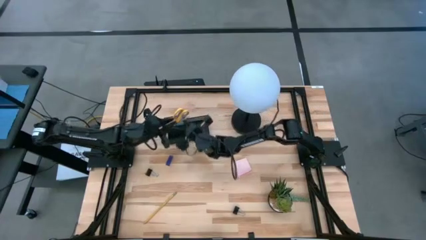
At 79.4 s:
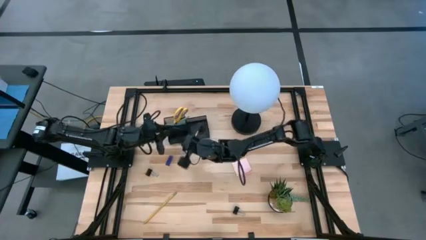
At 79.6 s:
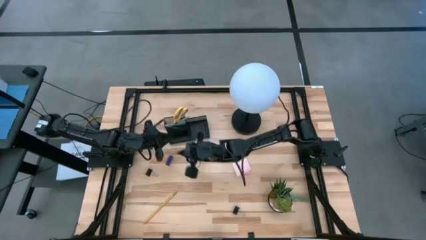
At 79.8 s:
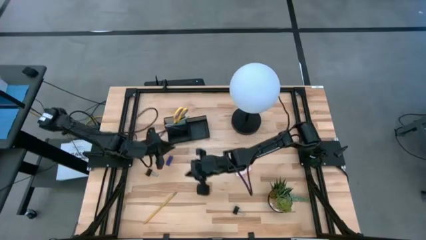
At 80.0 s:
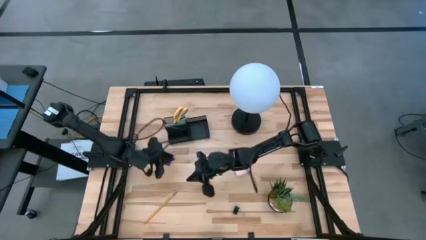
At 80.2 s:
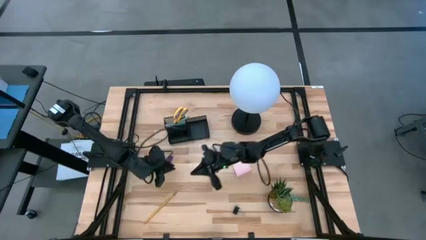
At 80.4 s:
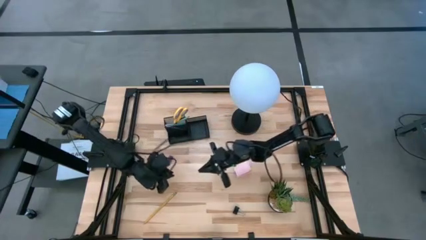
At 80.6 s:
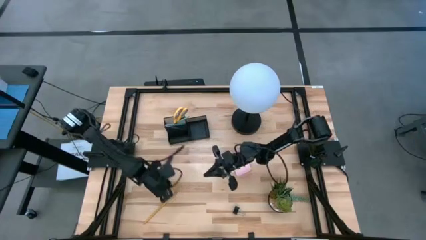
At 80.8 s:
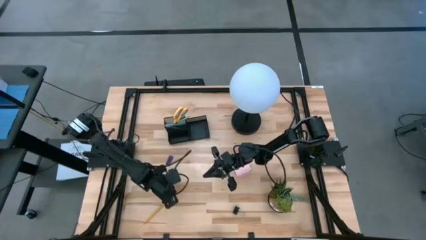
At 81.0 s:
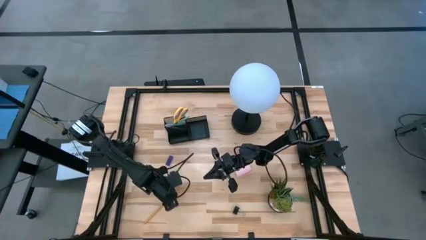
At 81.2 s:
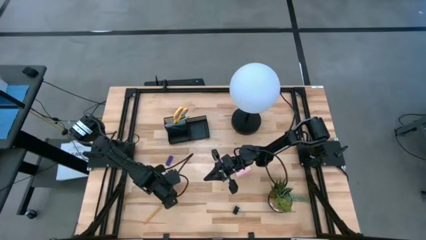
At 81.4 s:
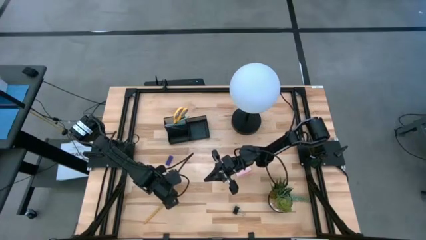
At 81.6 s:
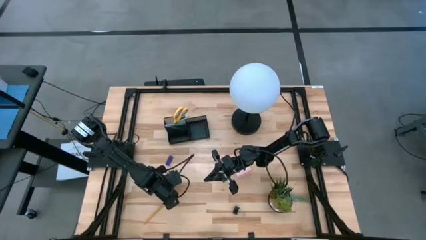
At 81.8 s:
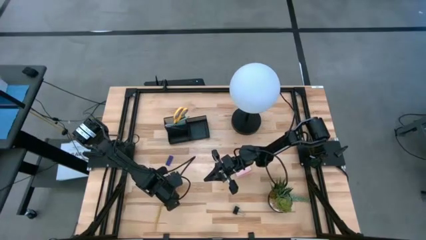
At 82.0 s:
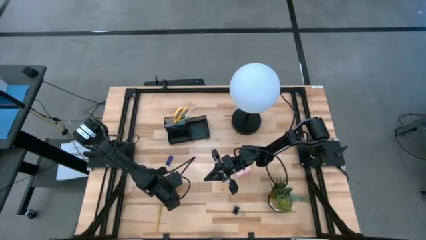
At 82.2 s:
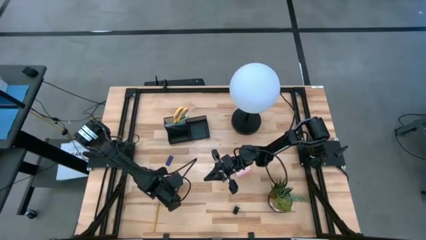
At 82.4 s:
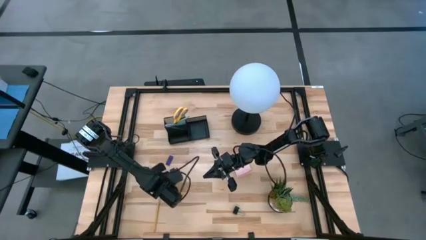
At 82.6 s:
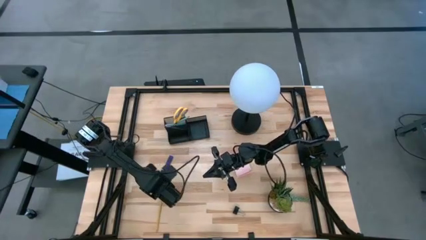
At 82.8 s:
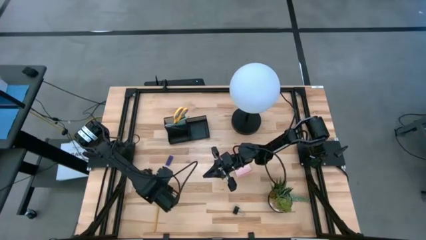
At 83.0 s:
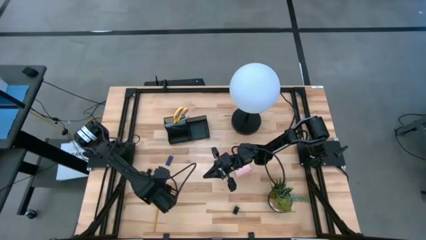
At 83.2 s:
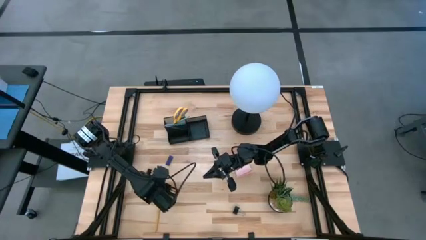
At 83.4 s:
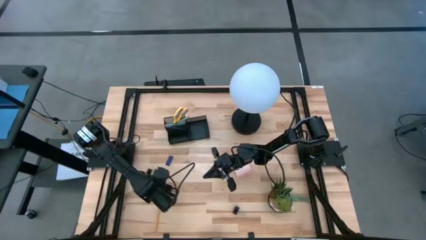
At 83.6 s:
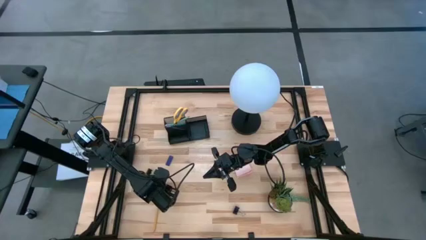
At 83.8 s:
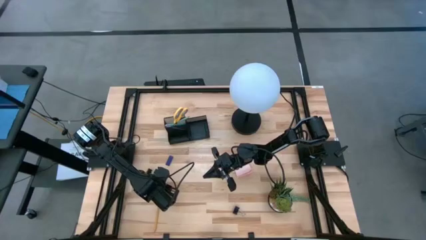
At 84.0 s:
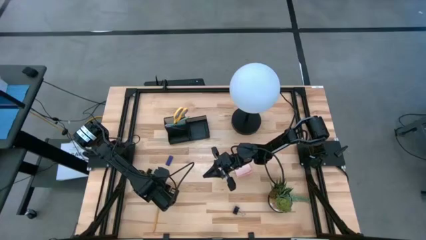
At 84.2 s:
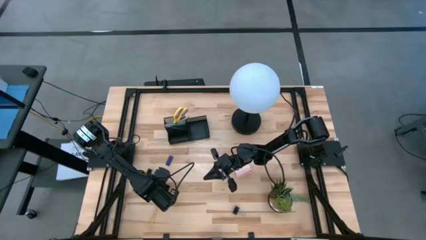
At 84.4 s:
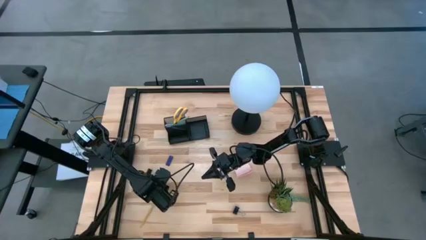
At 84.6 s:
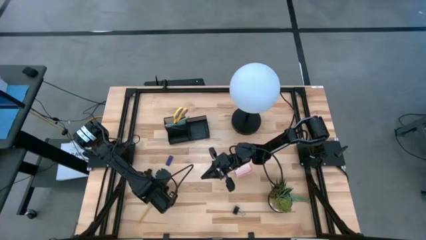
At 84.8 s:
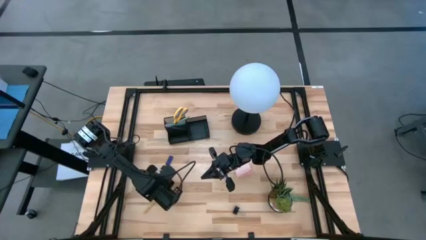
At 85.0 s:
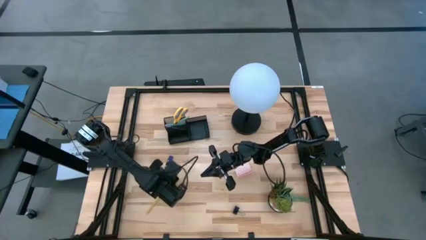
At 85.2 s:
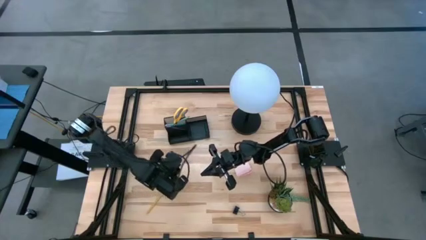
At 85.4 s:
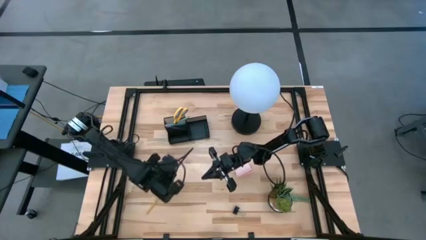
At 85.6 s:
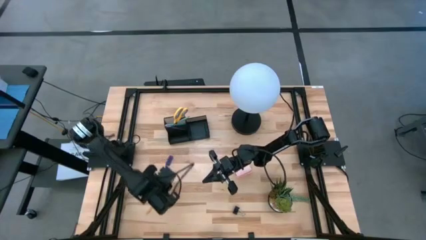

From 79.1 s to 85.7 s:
Task: Pick and place office supplies into organizer
Put the yellow pencil into the black desk organizer

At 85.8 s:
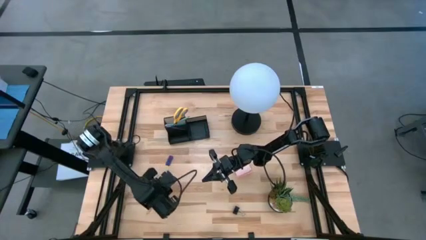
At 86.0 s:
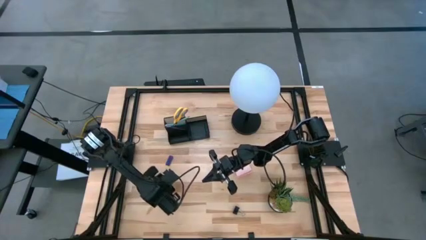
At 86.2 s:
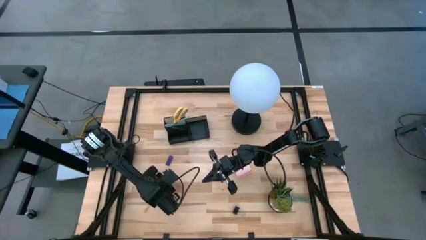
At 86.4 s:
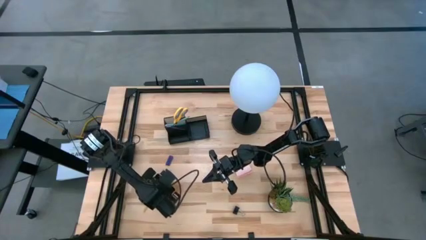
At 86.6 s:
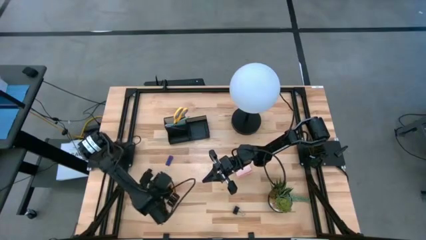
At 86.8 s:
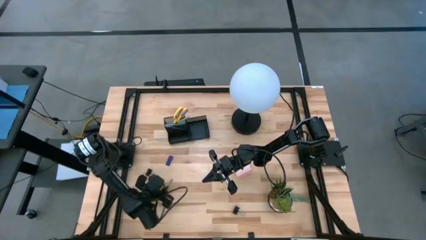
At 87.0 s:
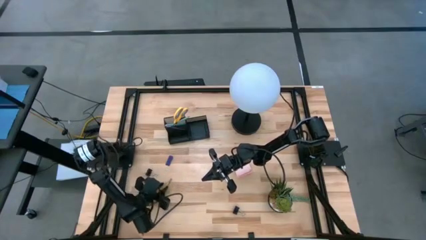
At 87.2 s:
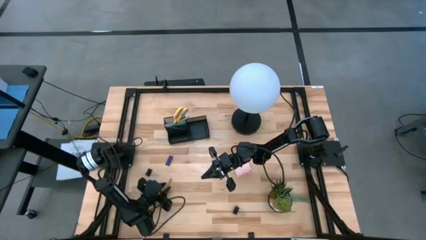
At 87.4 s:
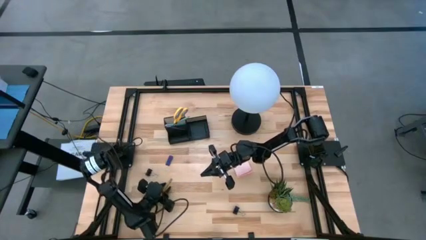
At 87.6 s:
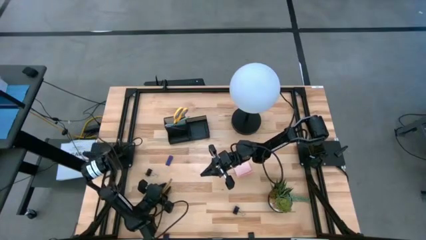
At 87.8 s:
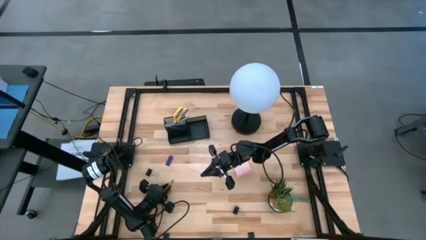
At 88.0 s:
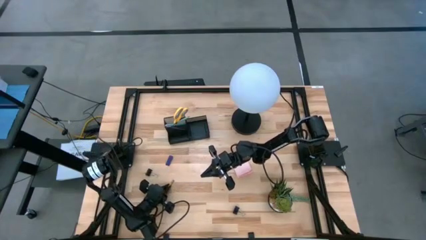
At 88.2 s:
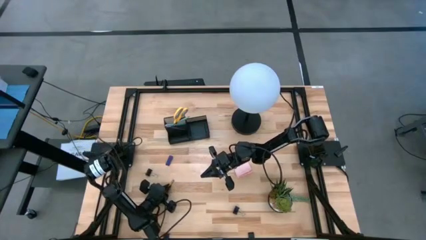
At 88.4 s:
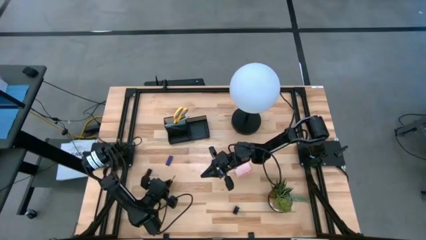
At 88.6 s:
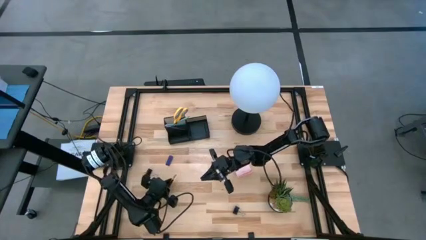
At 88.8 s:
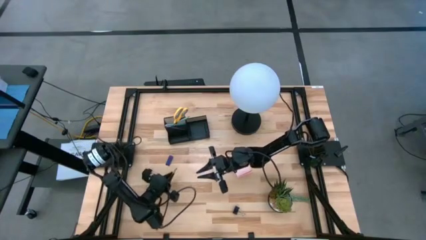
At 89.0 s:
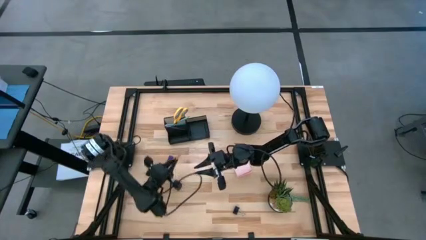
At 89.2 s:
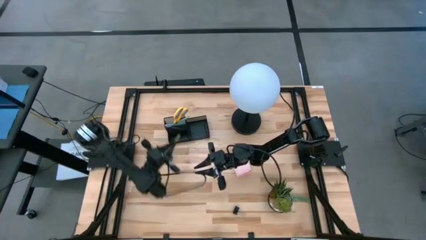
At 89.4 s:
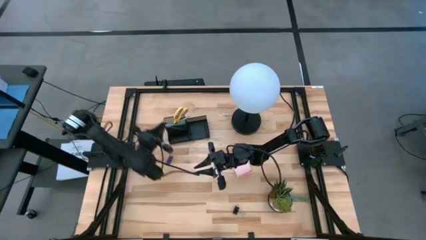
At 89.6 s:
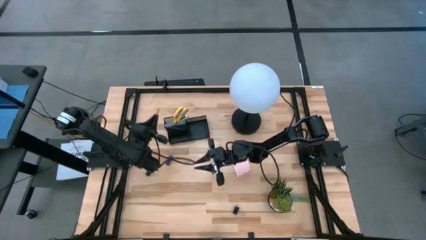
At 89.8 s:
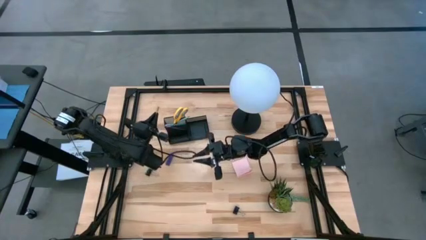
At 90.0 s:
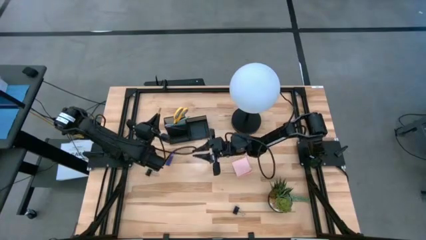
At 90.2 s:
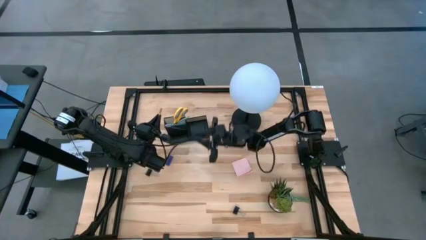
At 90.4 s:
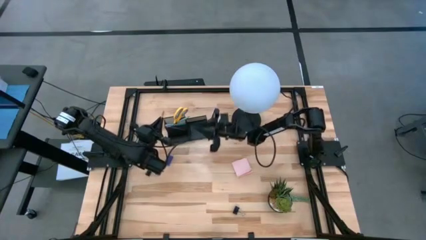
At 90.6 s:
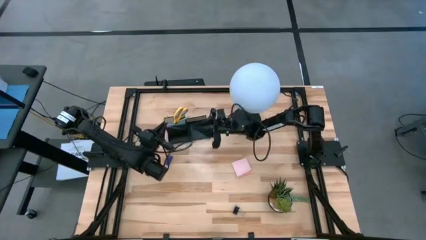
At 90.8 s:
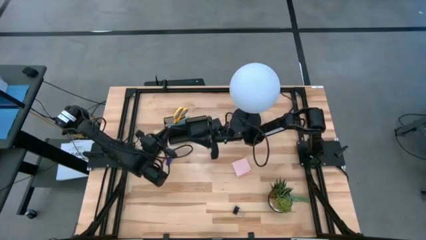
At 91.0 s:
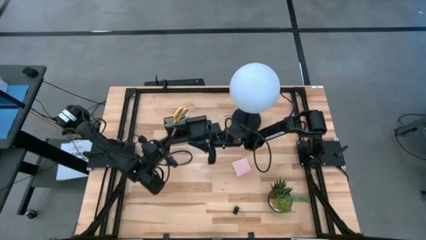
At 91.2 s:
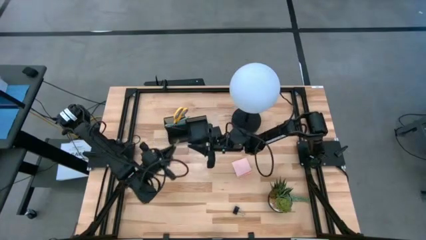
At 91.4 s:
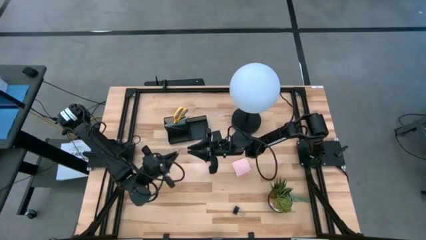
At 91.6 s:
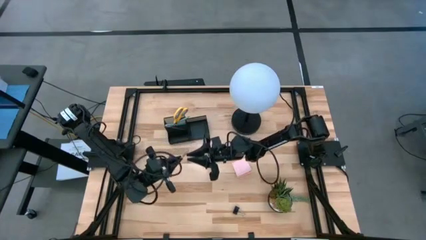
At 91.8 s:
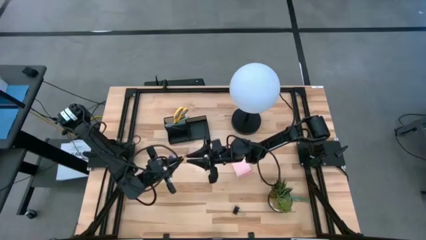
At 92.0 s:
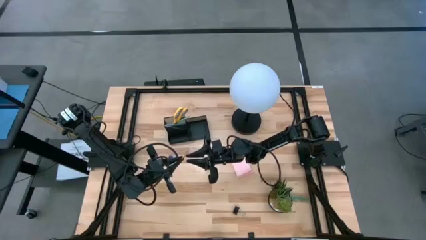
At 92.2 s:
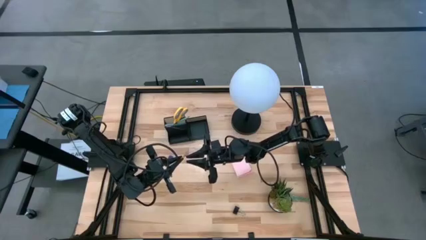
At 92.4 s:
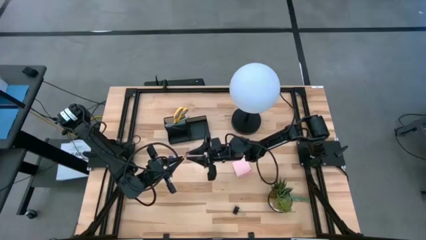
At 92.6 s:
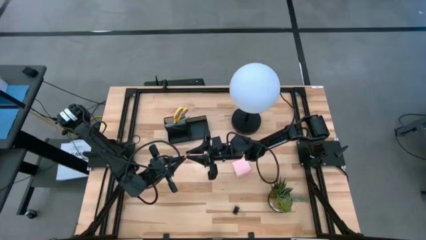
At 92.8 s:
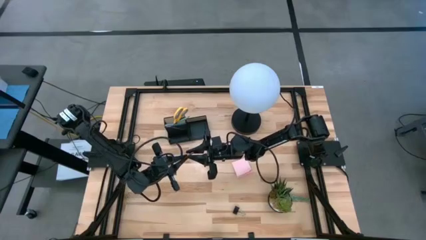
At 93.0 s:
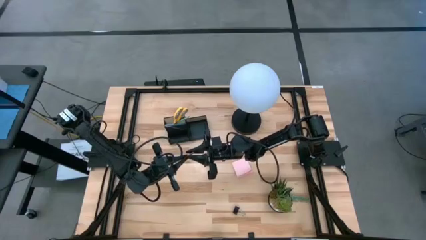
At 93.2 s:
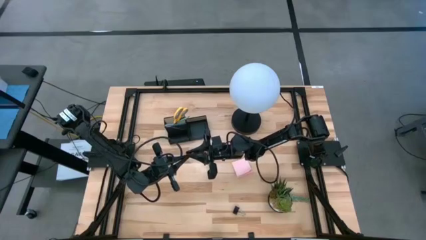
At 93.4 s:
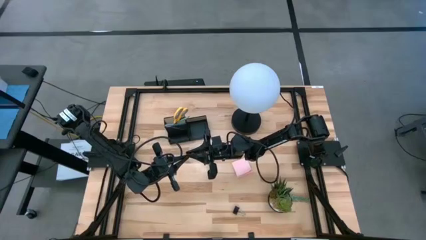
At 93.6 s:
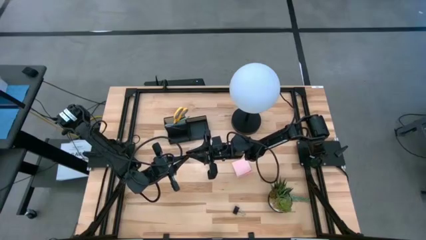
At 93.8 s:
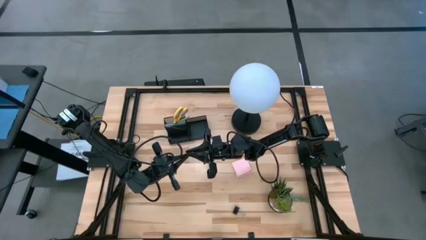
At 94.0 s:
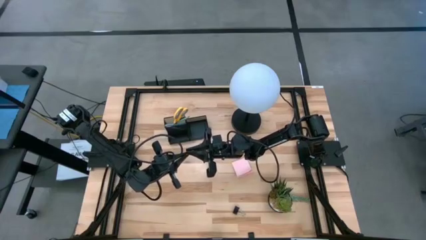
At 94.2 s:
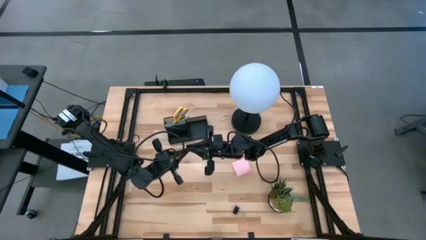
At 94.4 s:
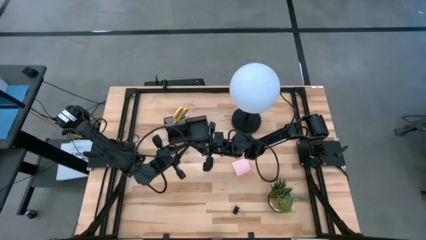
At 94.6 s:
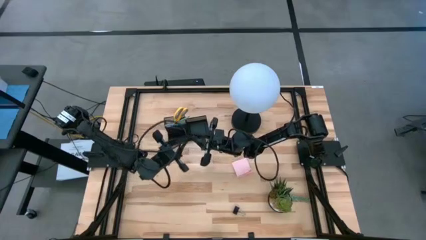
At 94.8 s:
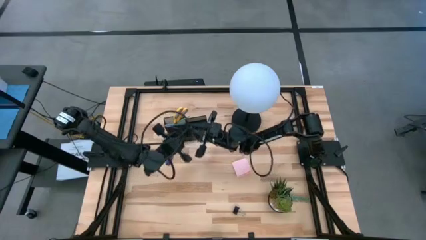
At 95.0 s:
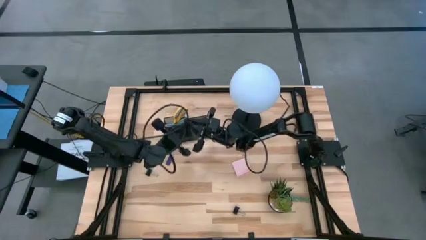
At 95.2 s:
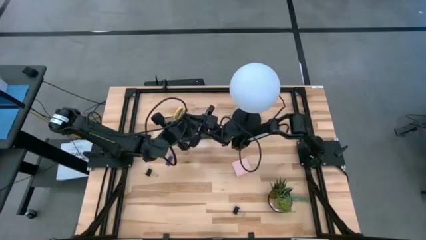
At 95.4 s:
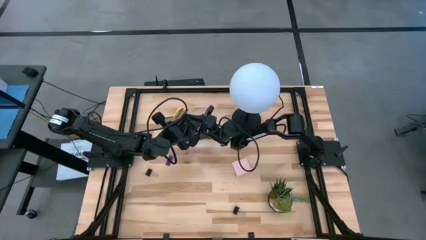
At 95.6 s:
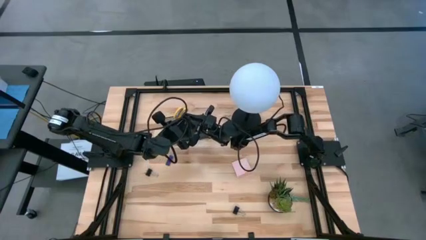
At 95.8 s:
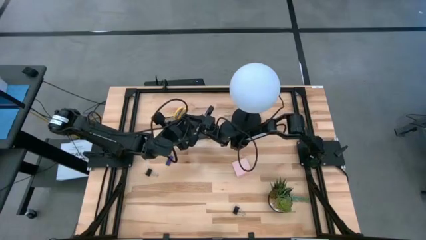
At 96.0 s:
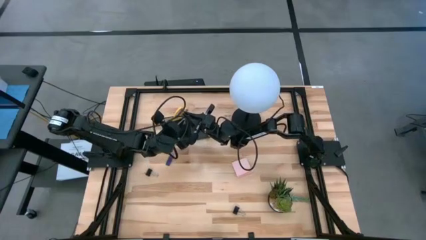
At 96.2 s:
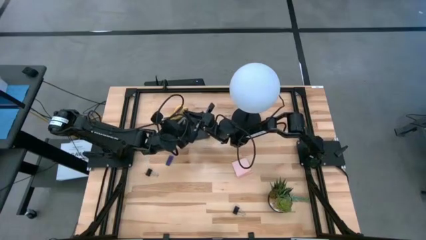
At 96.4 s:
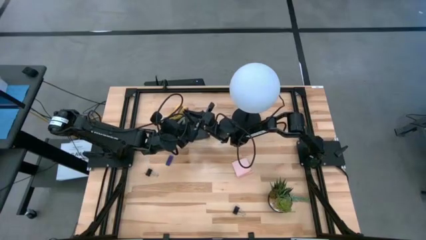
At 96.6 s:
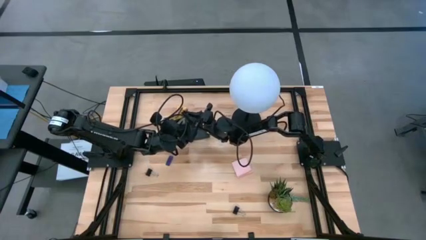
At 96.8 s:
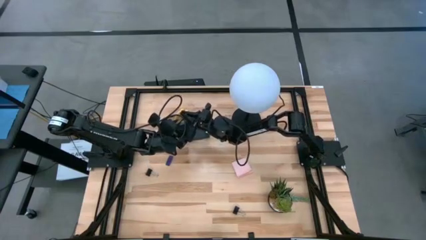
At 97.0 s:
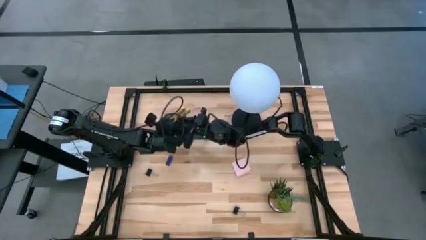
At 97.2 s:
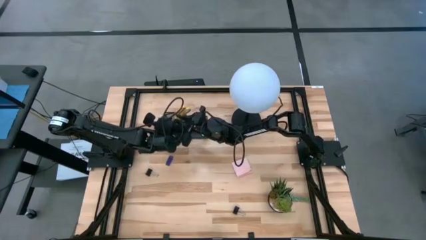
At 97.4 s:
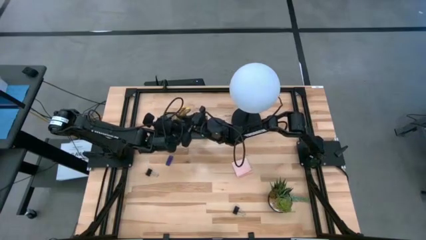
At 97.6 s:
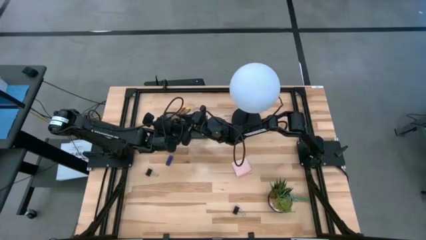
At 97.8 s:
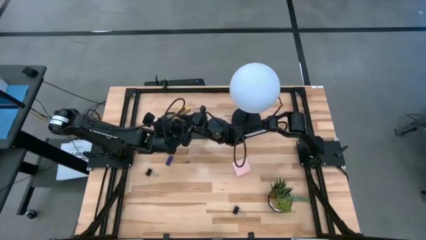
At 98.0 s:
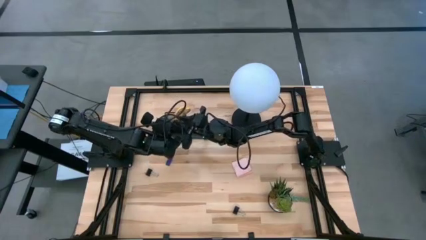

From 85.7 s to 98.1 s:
Put the yellow pencil into the black desk organizer
